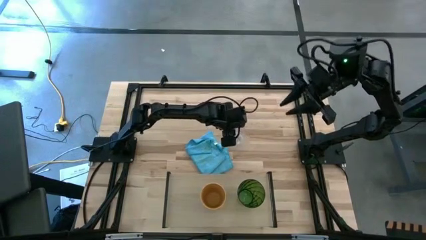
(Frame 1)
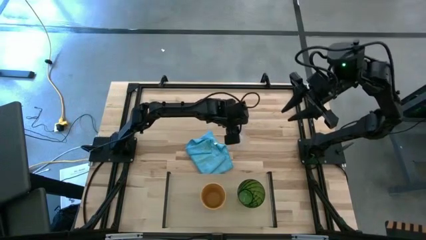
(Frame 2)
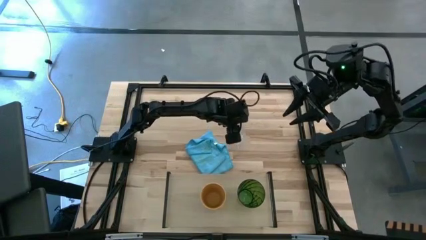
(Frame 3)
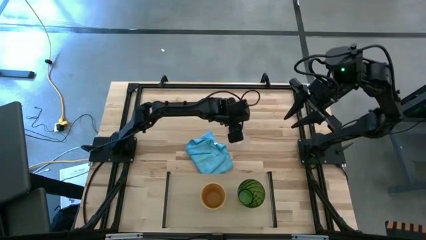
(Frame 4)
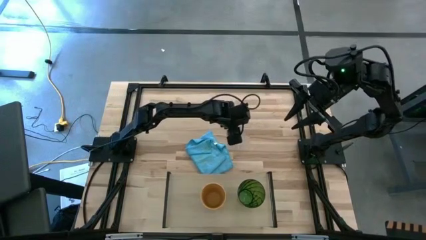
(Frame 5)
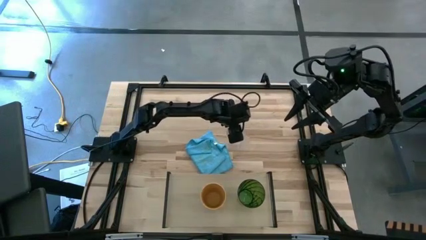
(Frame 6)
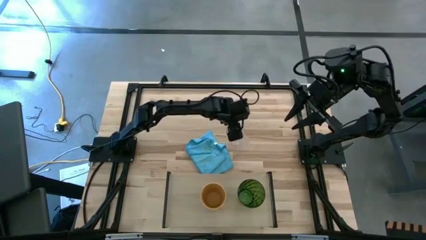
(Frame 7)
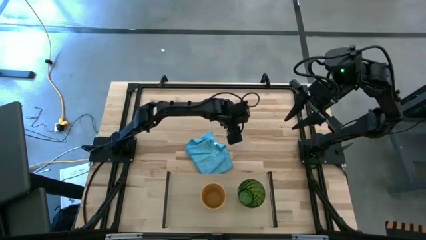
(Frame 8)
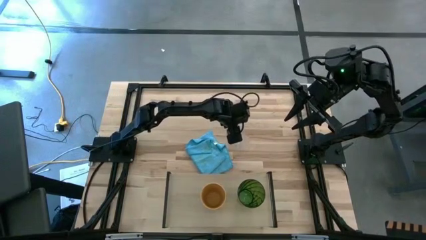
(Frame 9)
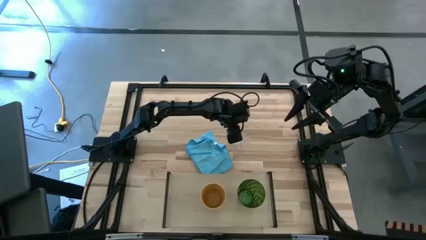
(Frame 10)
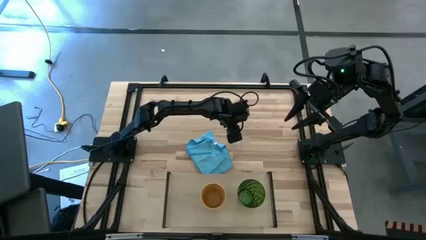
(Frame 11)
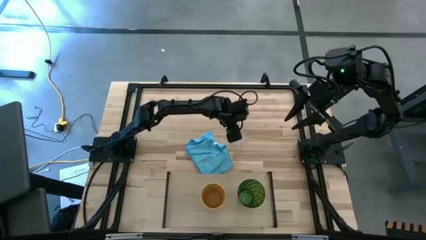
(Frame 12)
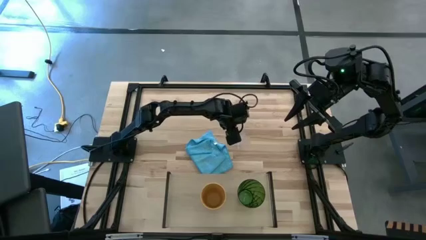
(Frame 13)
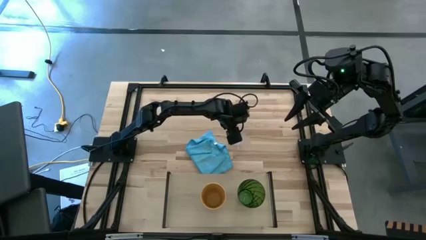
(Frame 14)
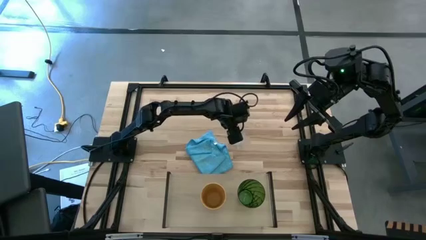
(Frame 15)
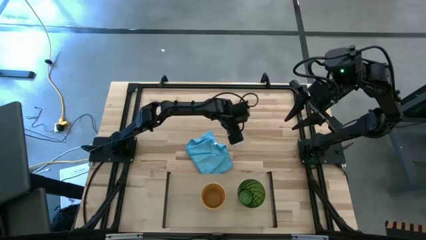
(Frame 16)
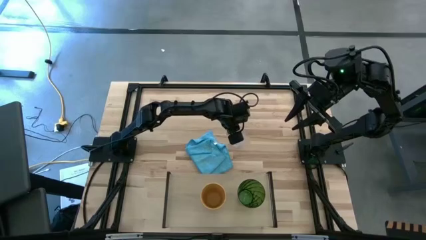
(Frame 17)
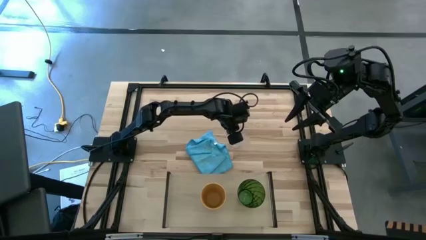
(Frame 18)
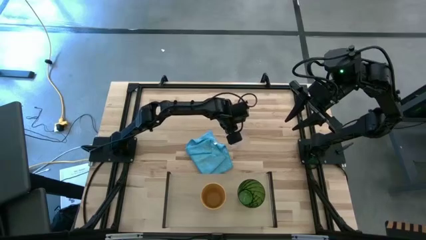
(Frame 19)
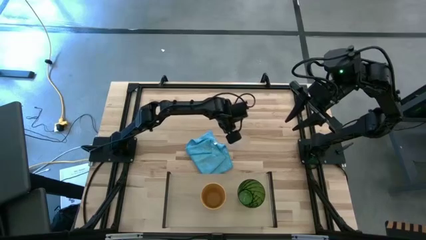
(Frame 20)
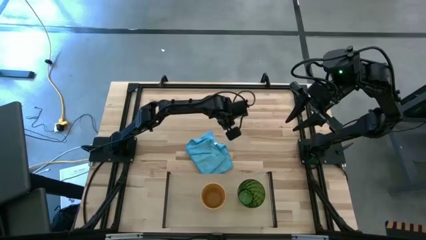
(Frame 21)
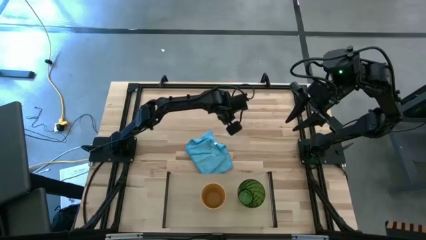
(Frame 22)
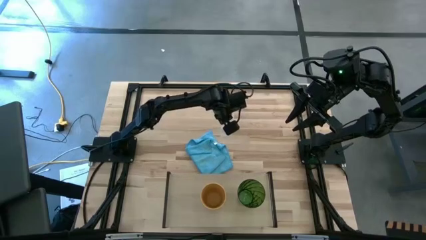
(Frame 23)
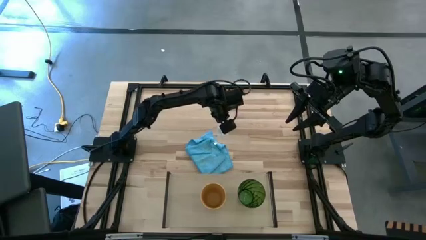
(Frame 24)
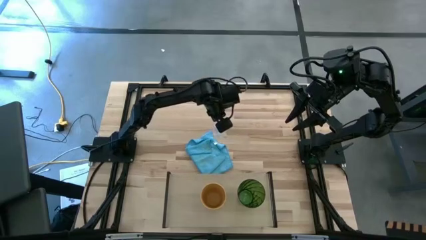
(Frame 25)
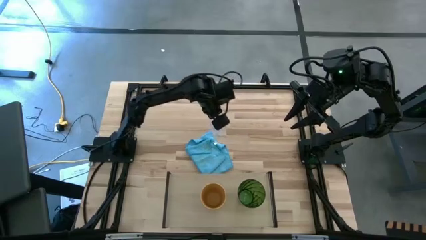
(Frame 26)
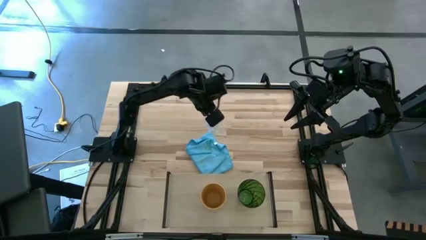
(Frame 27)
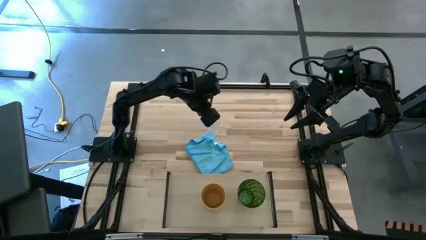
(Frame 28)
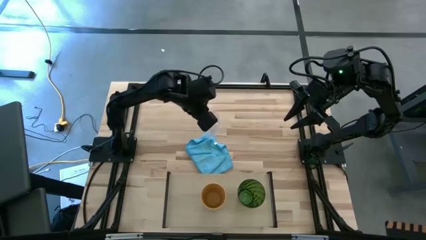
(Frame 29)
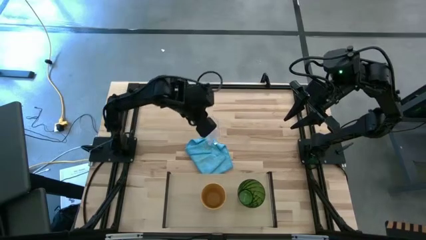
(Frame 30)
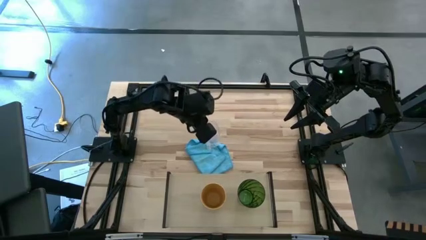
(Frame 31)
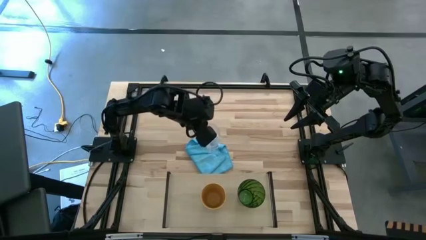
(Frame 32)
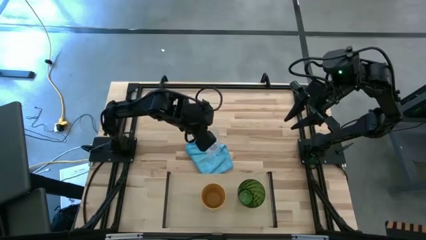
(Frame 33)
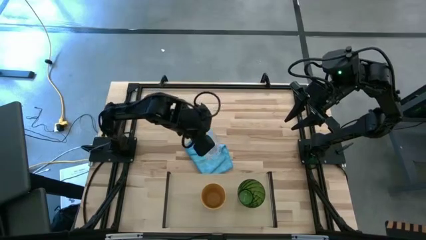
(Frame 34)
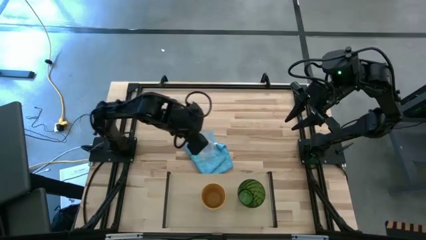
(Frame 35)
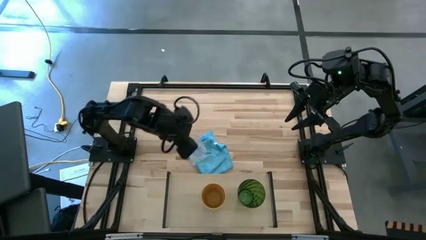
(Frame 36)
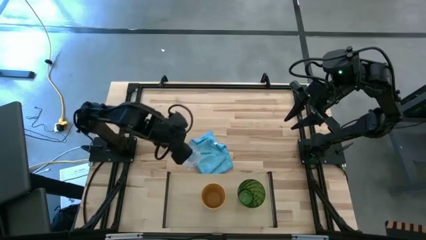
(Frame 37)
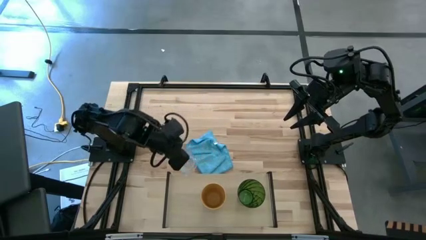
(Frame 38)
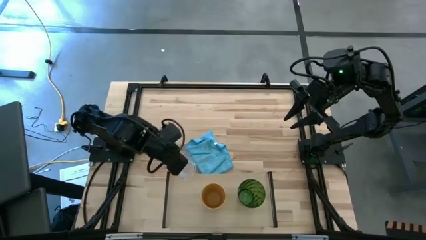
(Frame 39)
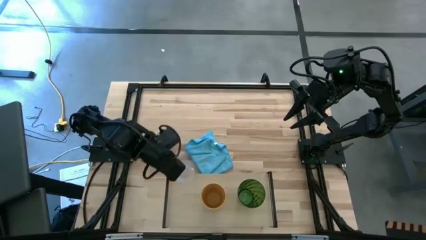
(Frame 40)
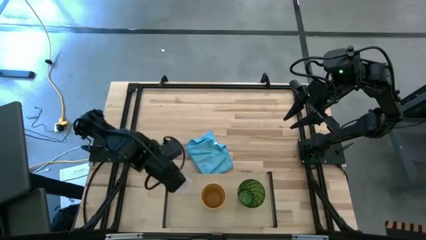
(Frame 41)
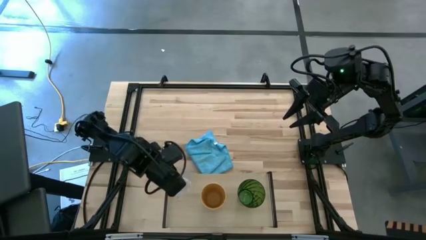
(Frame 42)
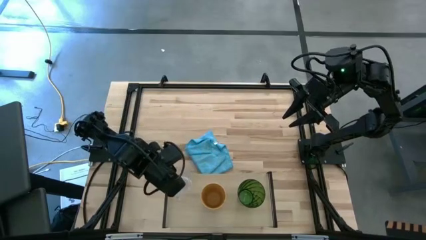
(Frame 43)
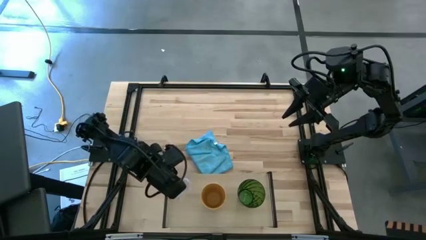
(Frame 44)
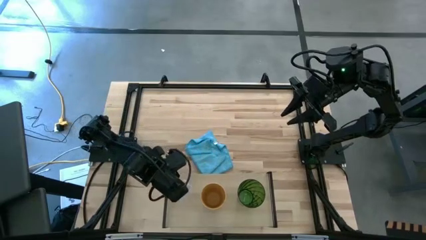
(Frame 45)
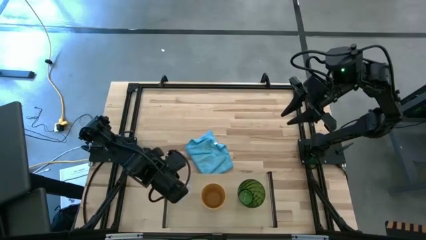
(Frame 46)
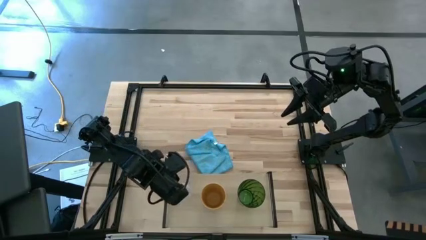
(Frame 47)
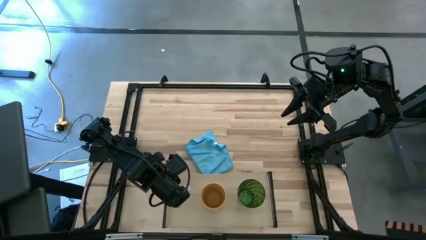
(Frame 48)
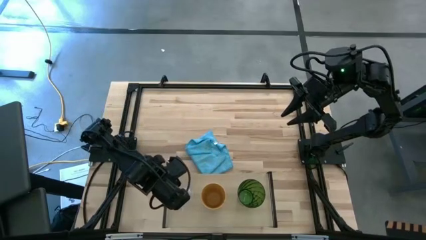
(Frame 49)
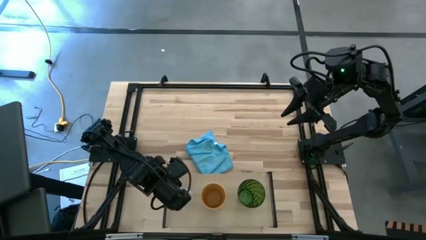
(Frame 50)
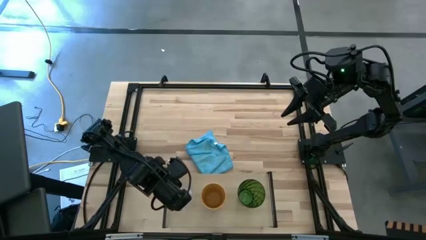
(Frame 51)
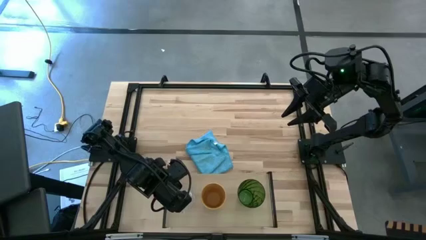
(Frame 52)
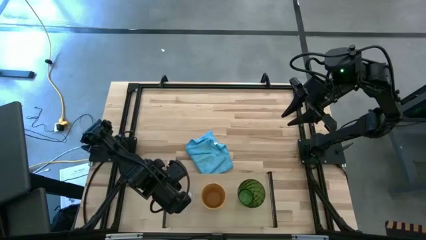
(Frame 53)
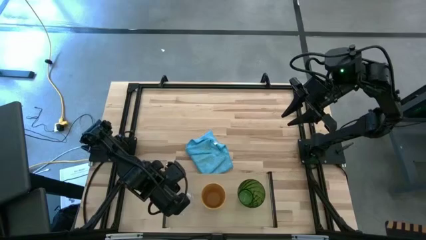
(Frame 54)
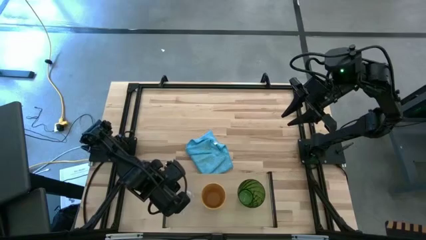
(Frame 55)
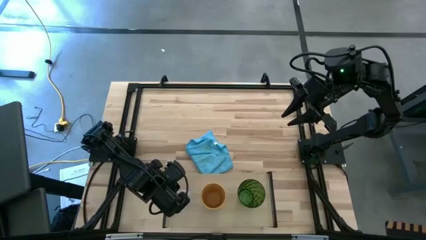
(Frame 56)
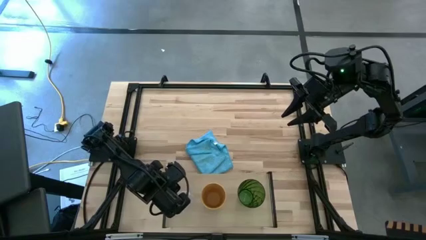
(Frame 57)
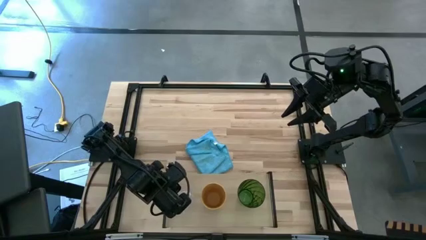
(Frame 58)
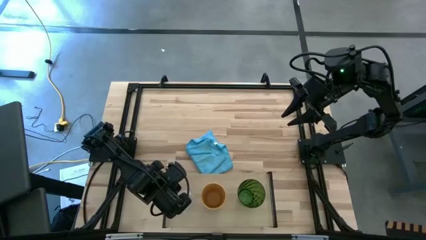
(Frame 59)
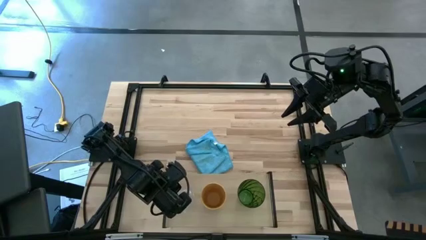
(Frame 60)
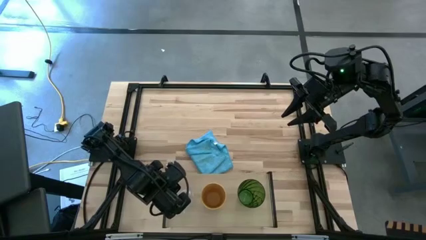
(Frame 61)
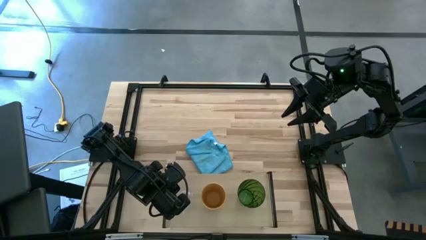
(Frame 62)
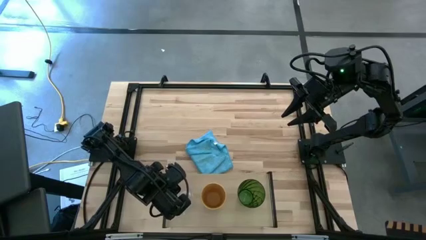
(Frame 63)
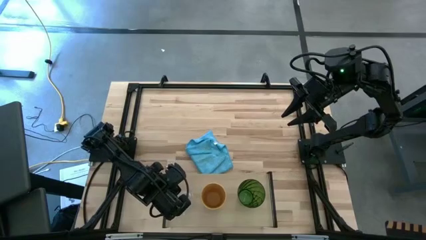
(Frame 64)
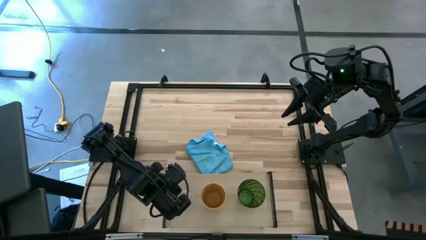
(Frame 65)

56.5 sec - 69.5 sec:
Task: Stack small to large cups/mugs on shelf
Put the transparent mug on the shelf

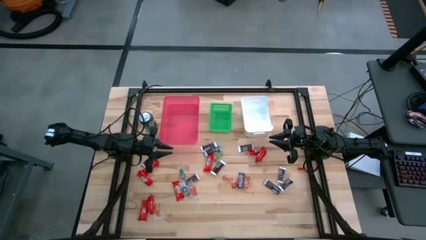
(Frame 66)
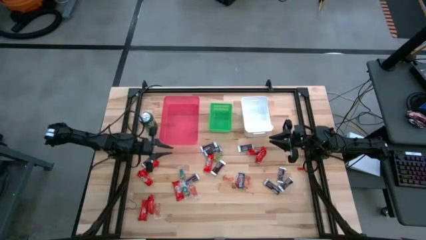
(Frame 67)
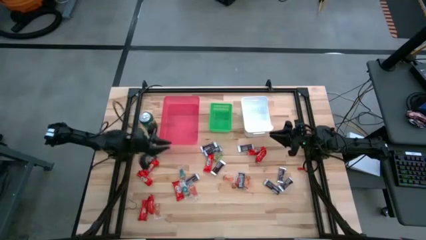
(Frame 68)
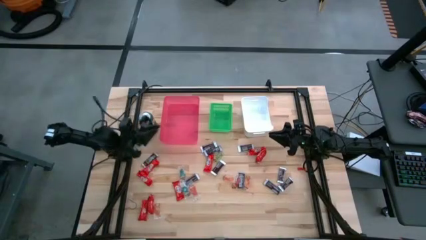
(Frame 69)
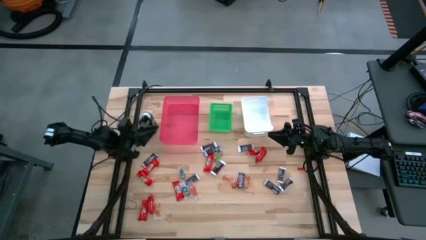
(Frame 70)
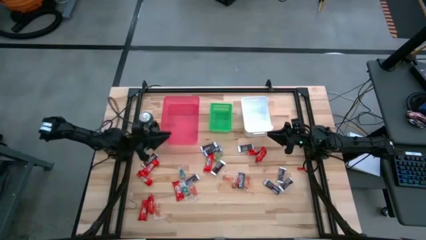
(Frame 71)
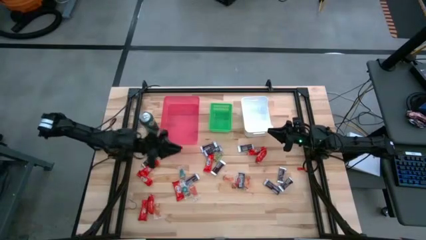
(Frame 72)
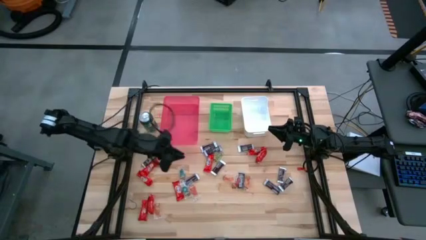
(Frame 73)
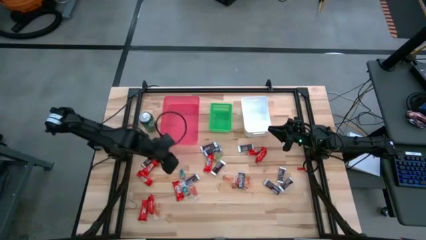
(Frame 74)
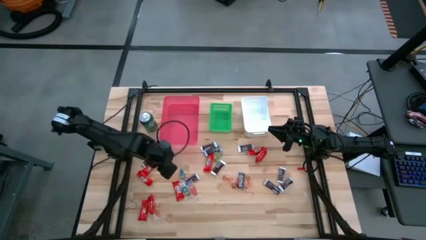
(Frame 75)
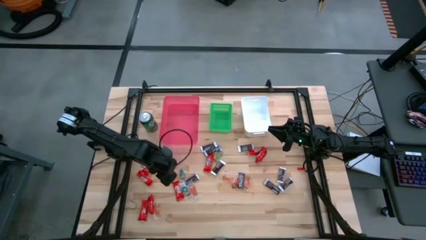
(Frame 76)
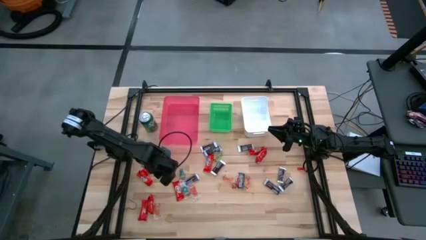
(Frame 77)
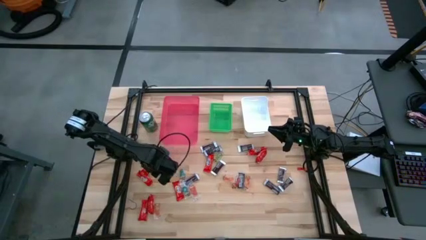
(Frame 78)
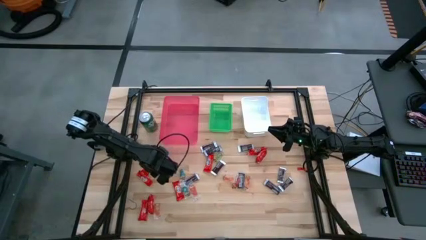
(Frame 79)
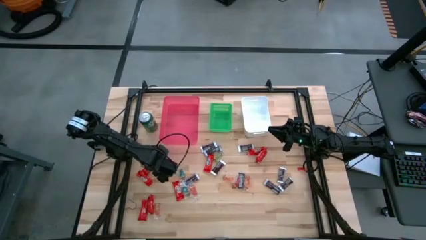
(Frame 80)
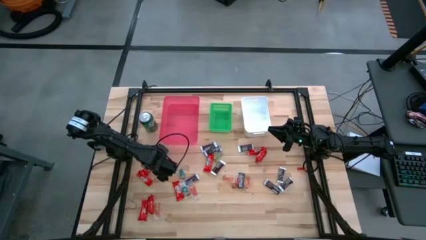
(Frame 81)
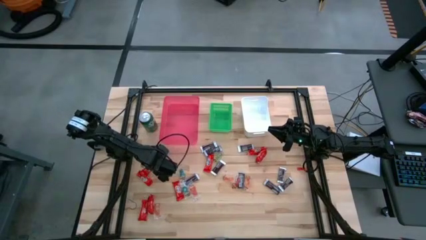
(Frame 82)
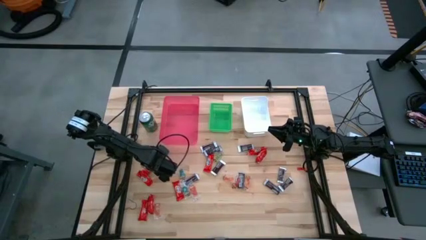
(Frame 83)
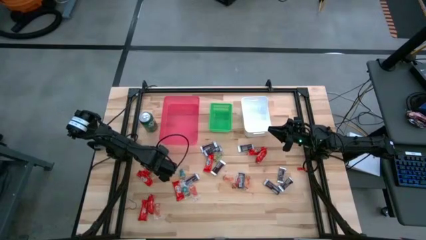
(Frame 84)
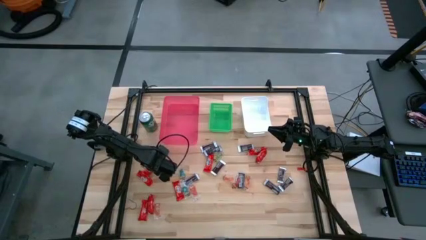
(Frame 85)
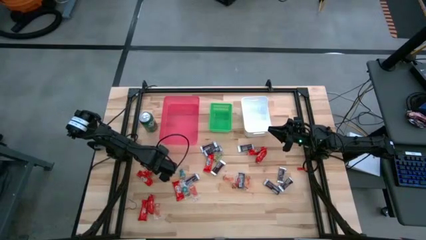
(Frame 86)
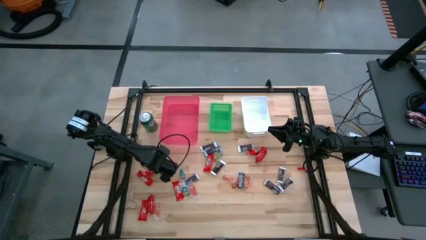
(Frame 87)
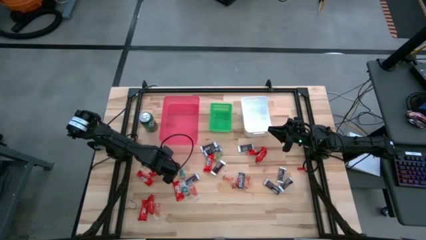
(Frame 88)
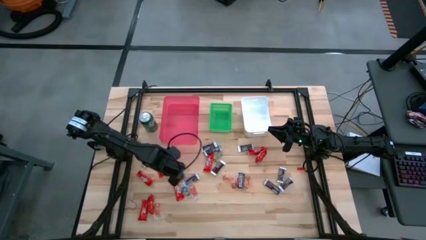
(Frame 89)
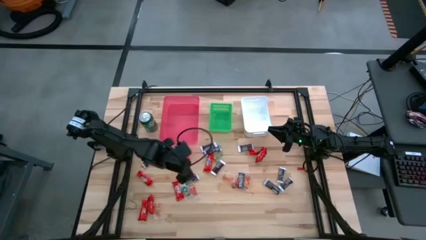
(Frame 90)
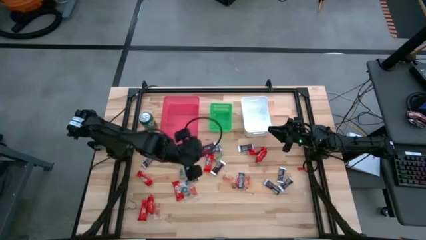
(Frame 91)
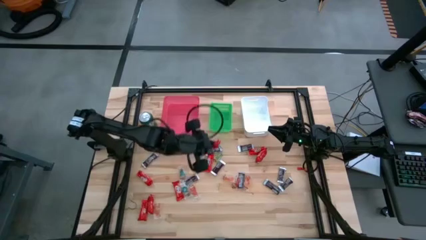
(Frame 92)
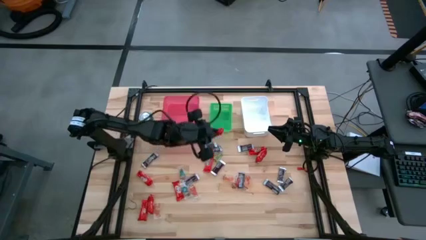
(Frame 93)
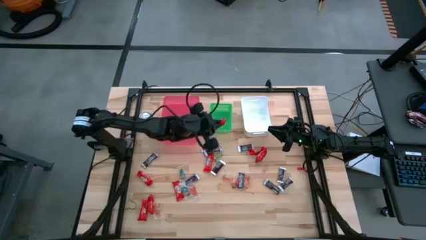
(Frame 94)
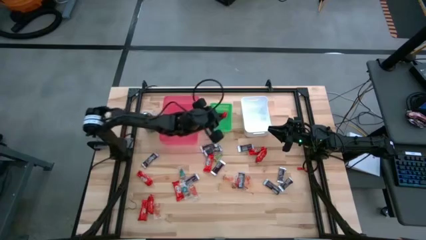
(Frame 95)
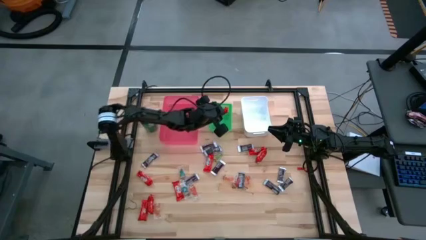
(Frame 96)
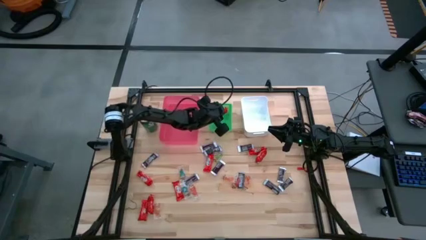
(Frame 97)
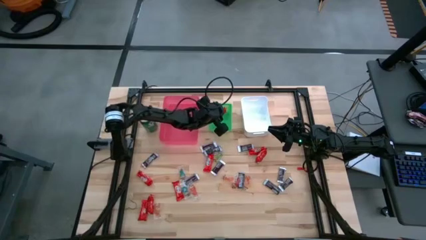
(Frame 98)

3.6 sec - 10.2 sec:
Task: Sort candy
Put the red chocolate into the green bin
